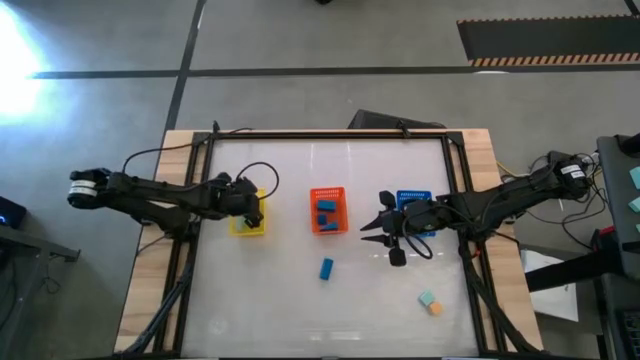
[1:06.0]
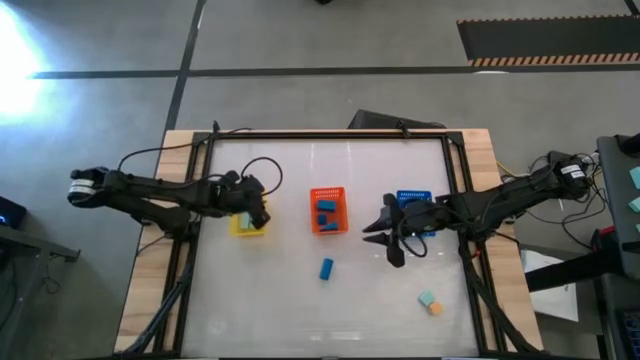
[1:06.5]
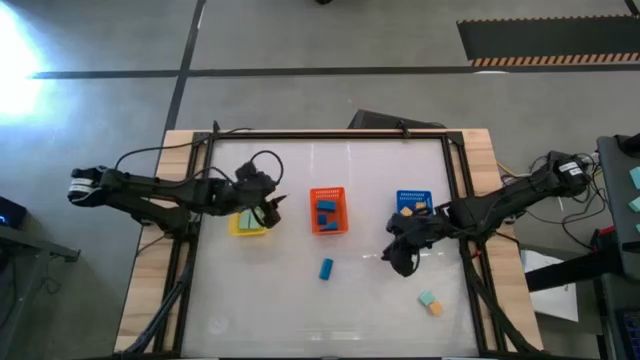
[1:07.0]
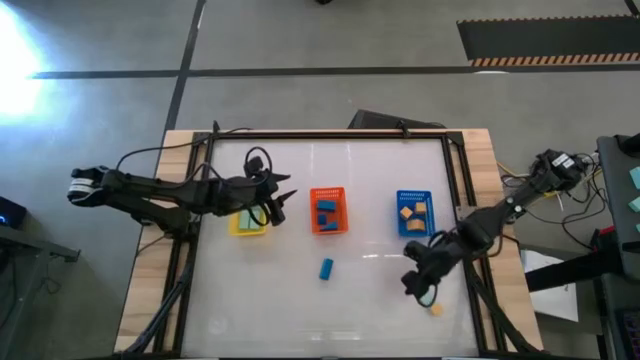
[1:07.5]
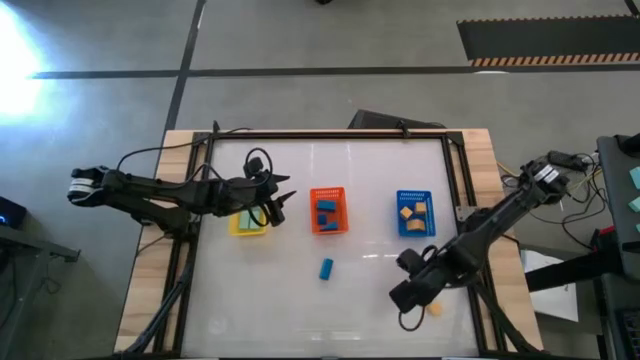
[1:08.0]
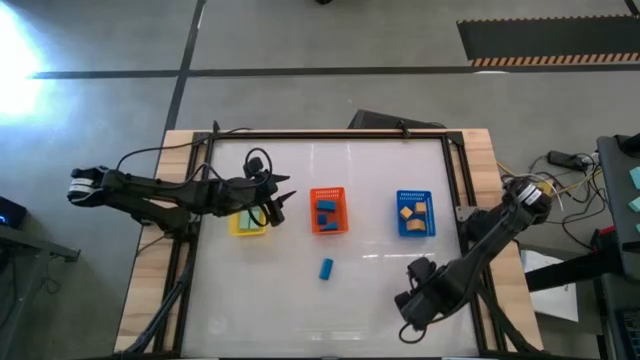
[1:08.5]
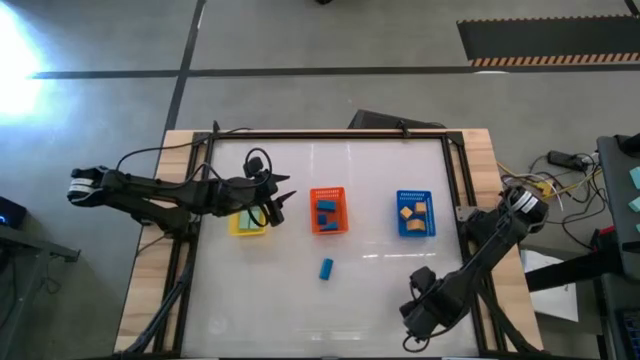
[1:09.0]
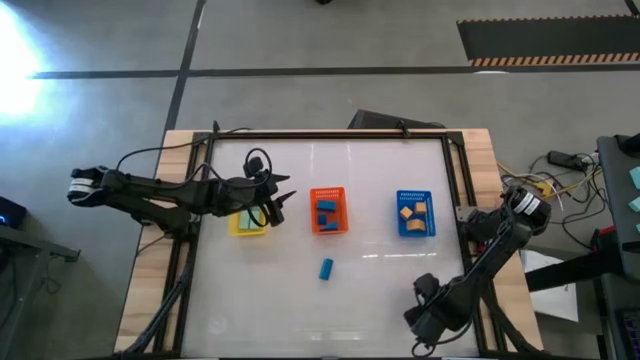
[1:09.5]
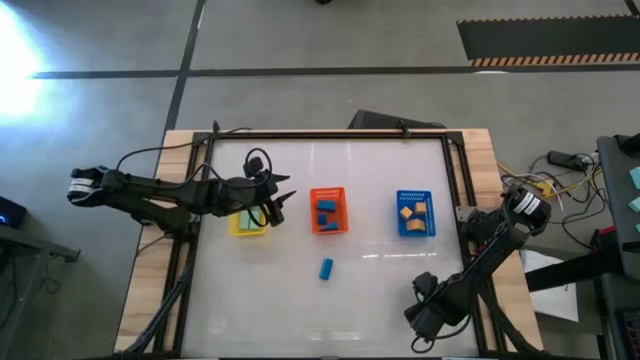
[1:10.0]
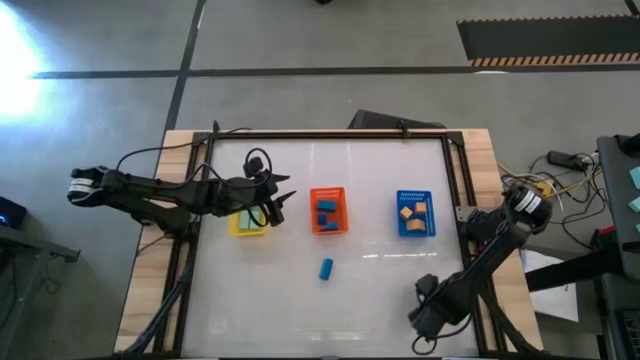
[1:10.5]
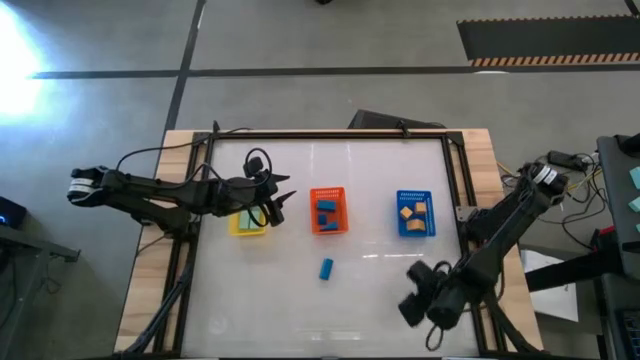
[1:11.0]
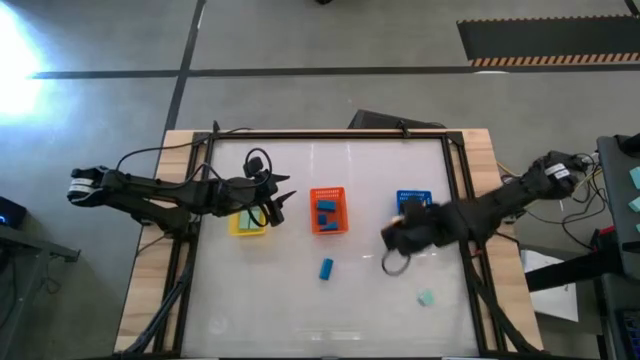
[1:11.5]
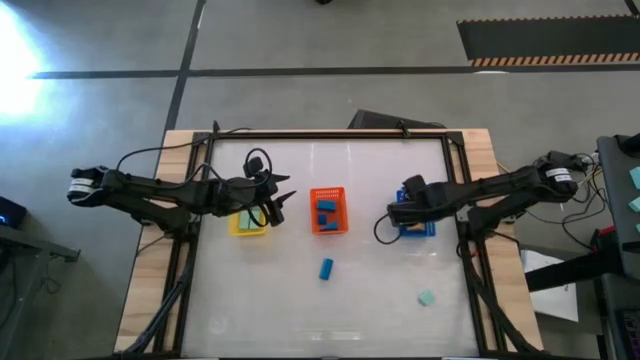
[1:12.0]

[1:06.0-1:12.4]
Task: Sort & place blocks by color
Put the yellow block into the blue bin

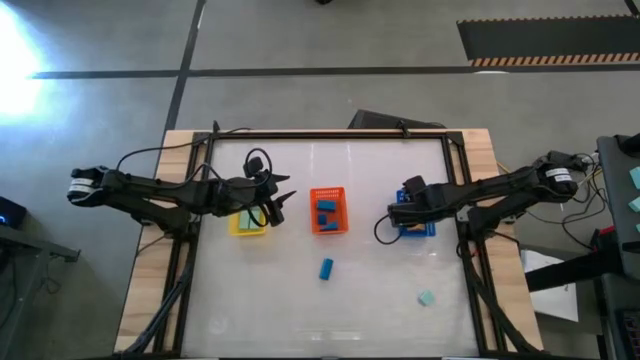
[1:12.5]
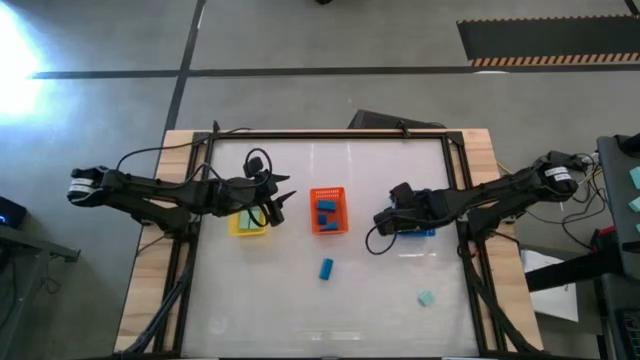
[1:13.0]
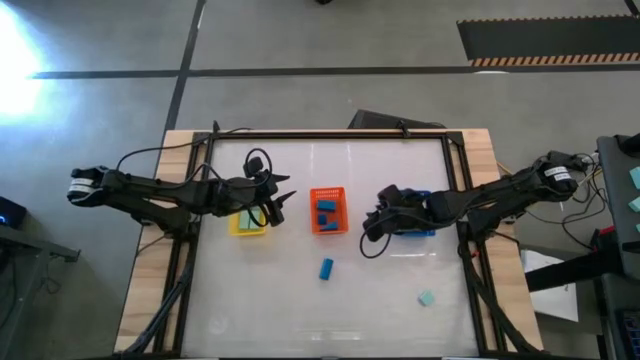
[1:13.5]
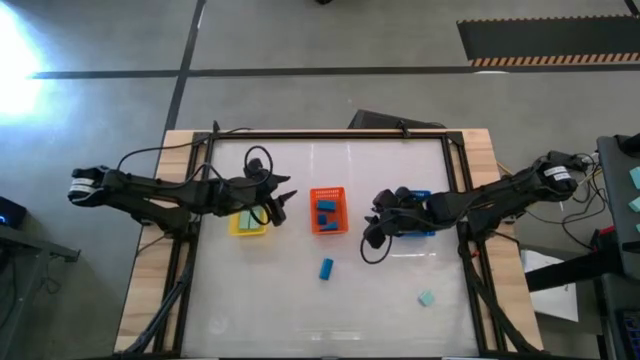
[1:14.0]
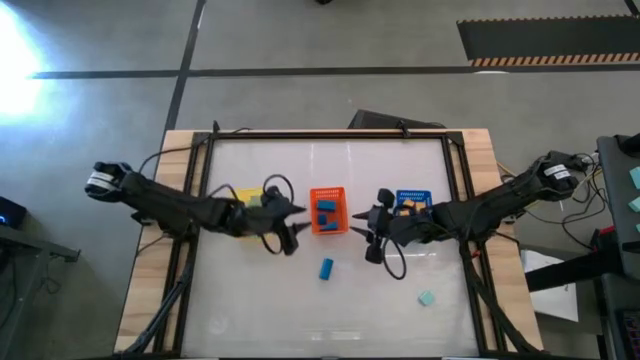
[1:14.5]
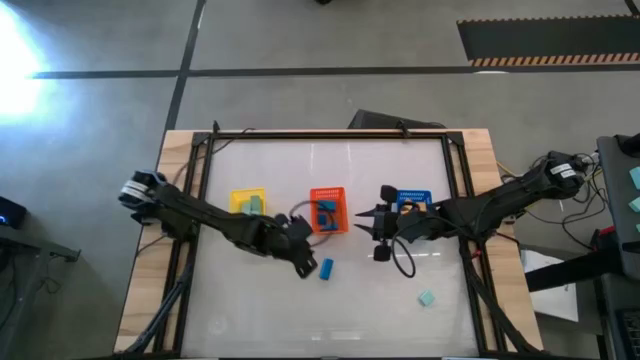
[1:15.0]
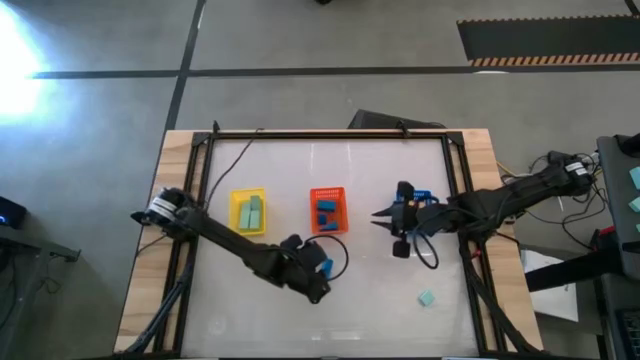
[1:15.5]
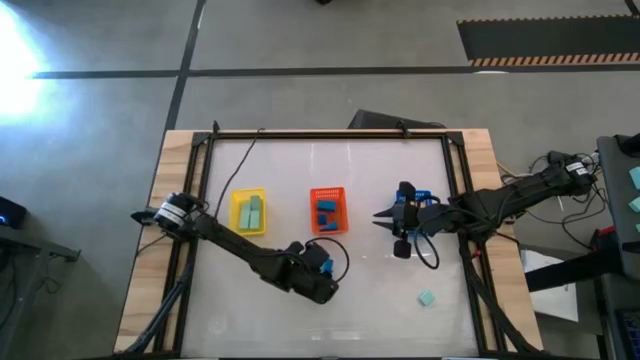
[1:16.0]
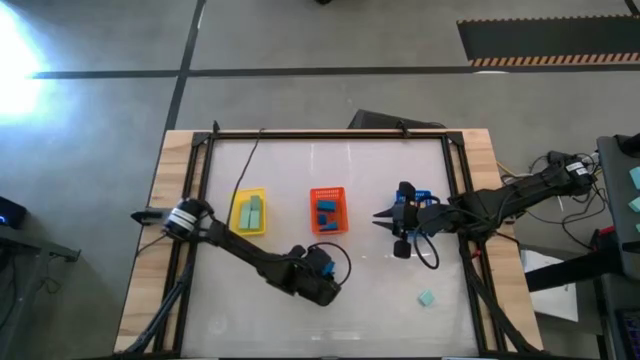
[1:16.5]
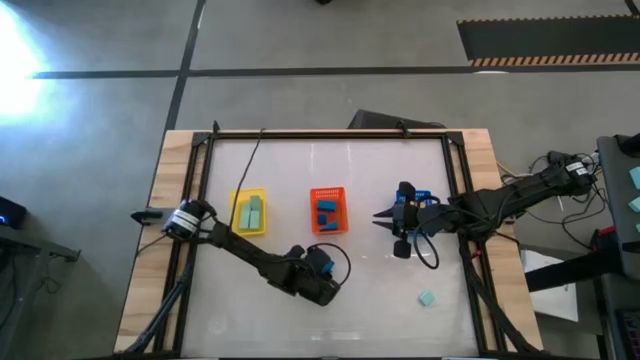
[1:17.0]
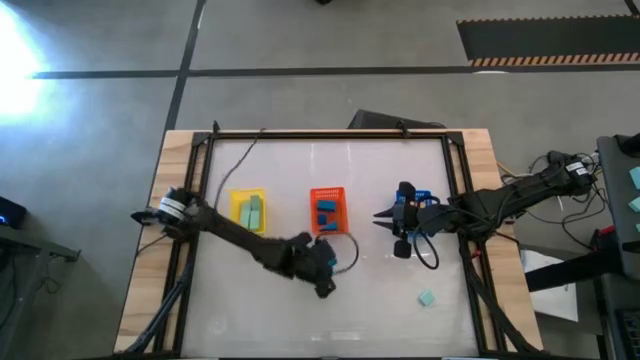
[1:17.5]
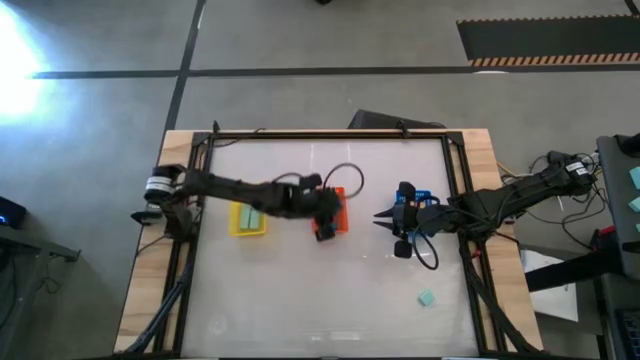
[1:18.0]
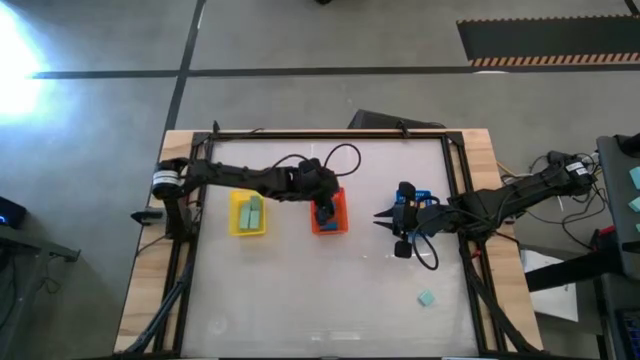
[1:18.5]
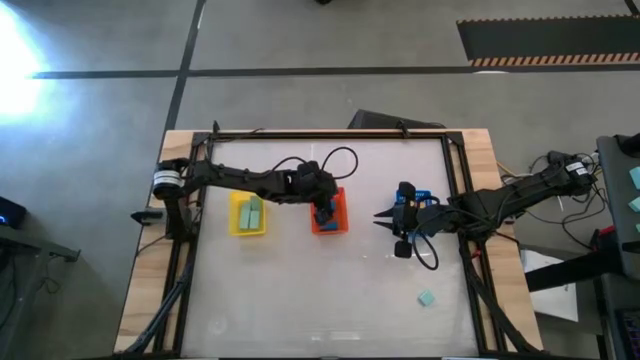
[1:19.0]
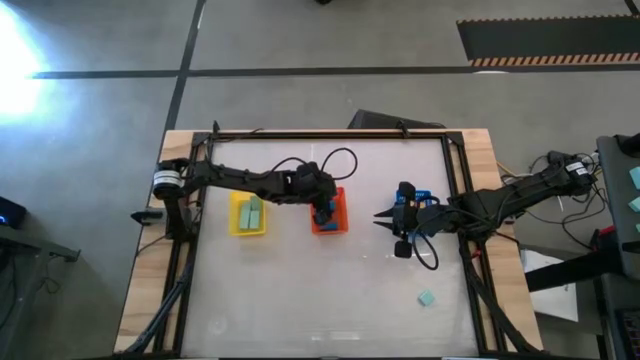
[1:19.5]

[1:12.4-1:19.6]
Put the blue block into the orange bin

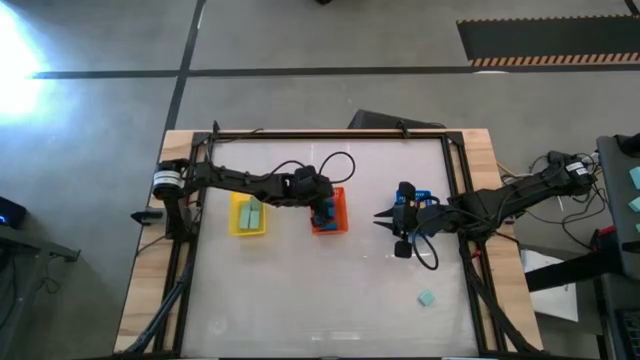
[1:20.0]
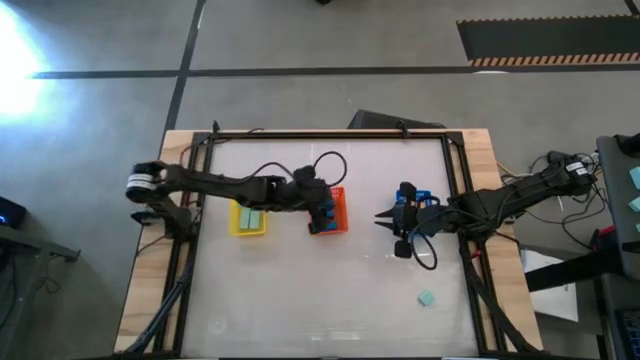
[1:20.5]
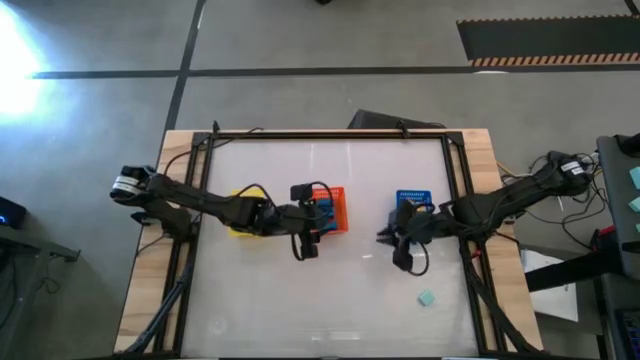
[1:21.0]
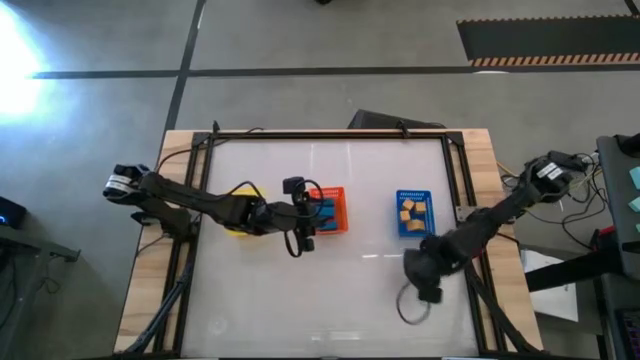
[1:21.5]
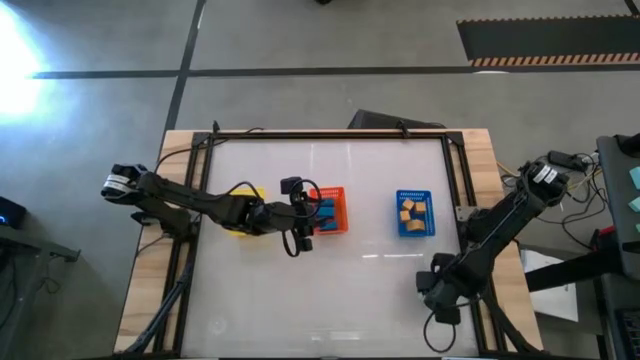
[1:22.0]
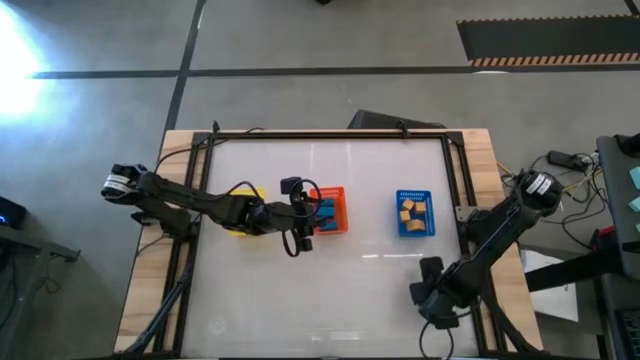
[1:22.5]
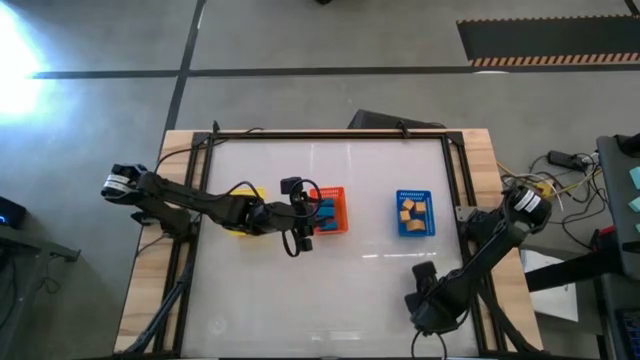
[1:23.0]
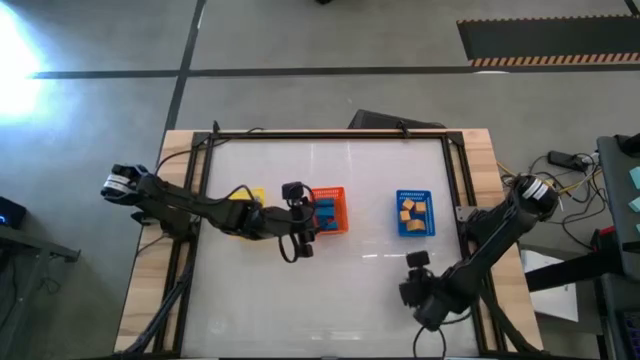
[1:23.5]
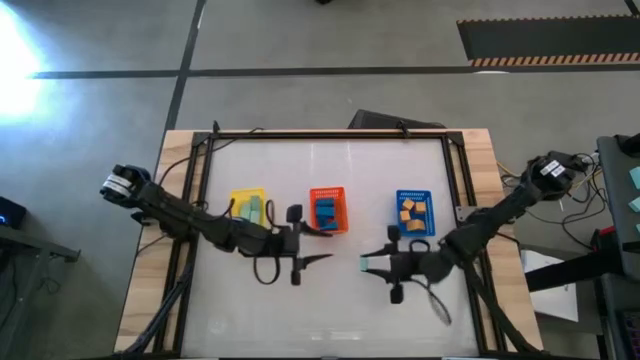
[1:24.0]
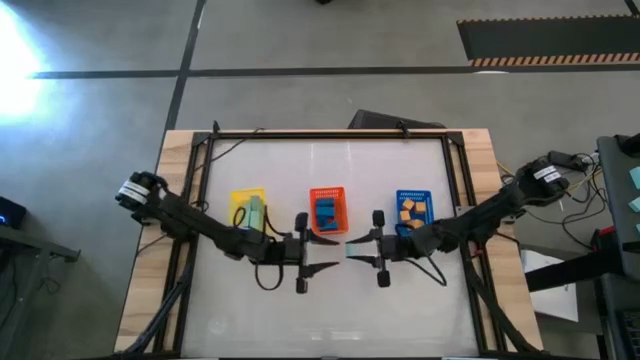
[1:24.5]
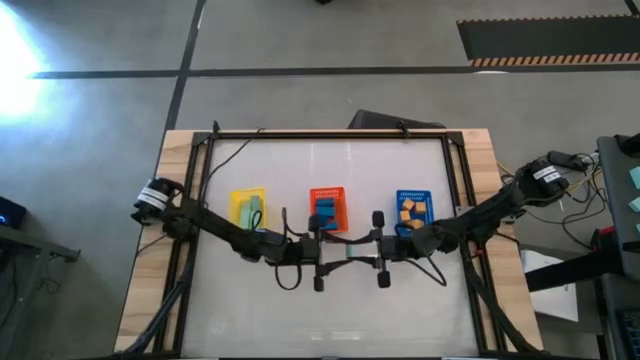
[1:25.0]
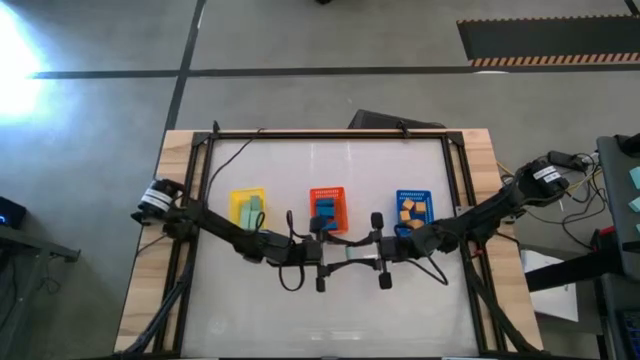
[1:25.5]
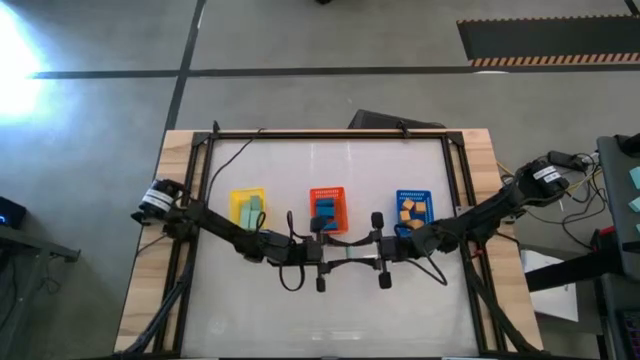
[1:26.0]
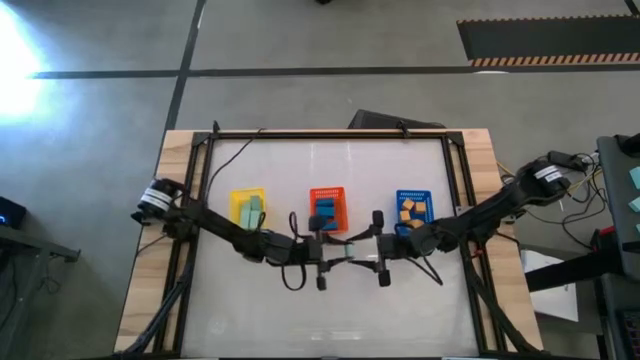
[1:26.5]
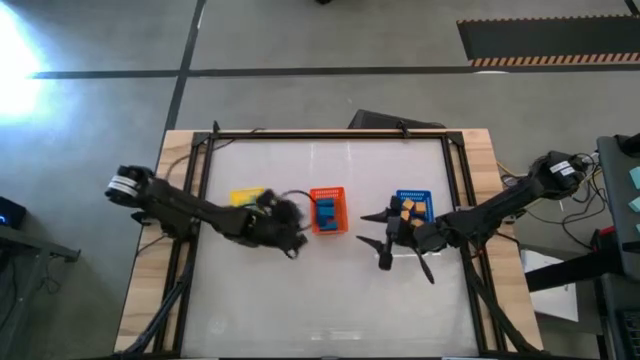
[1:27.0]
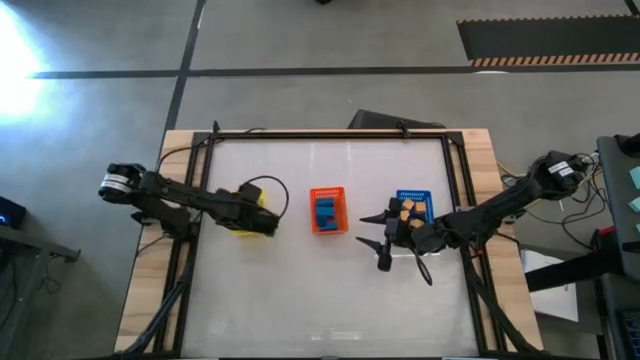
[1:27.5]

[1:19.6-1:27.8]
Put the light blue block into the yellow bin
